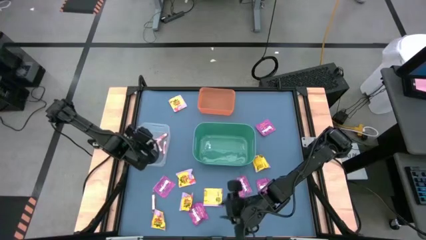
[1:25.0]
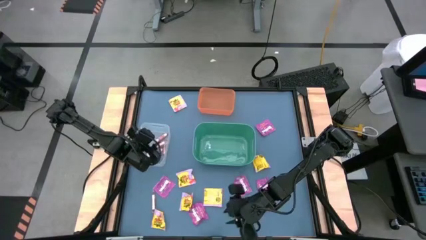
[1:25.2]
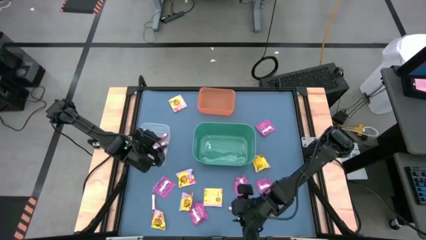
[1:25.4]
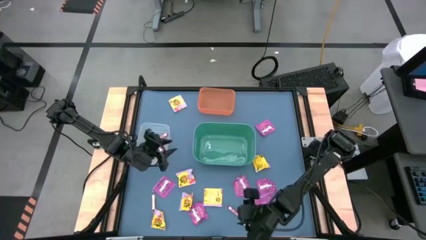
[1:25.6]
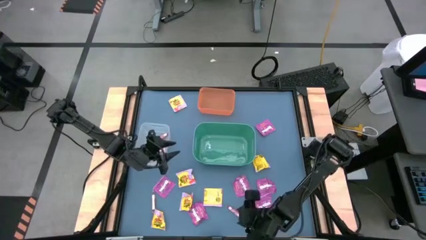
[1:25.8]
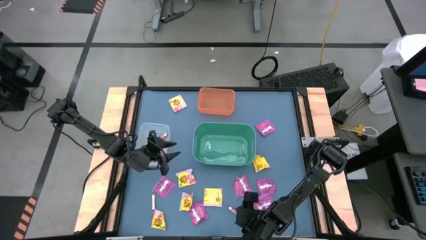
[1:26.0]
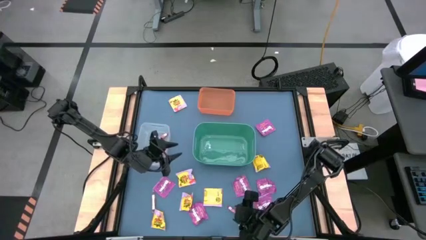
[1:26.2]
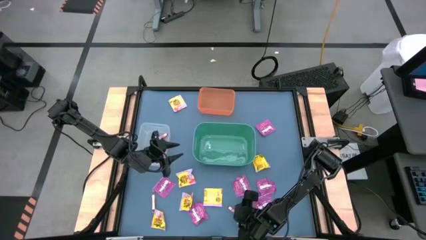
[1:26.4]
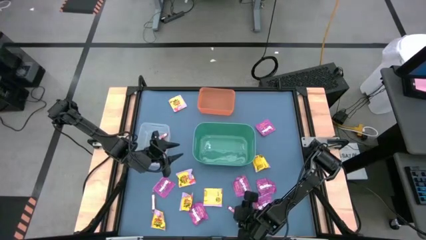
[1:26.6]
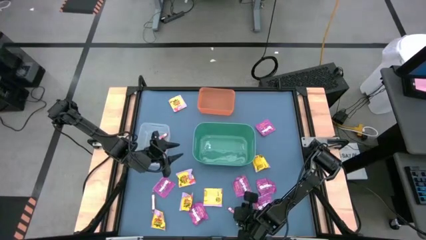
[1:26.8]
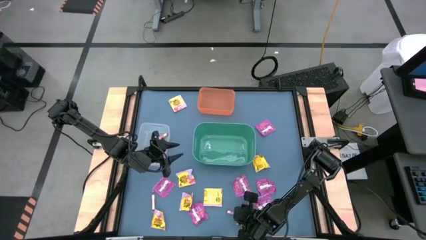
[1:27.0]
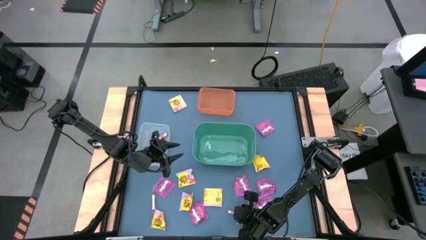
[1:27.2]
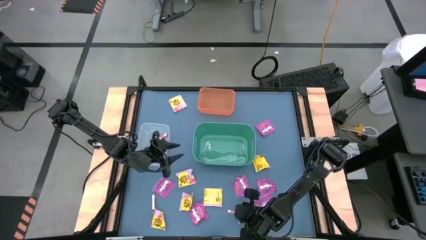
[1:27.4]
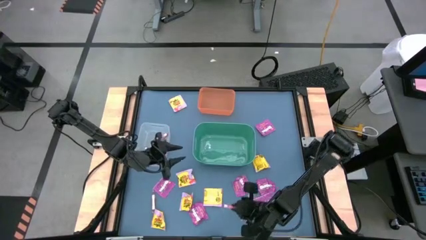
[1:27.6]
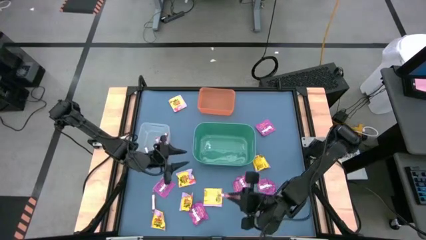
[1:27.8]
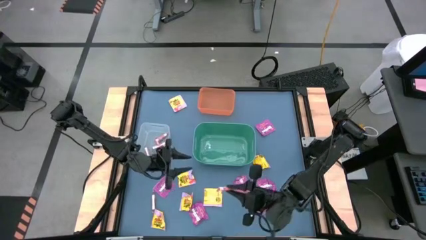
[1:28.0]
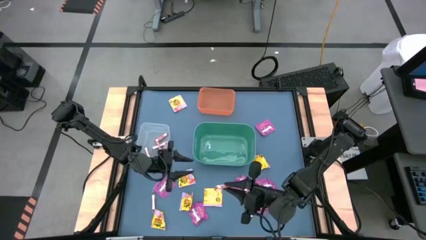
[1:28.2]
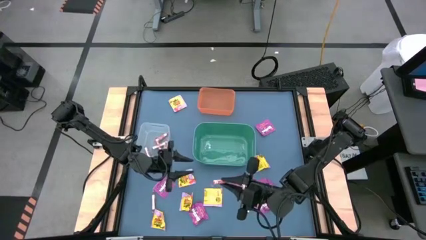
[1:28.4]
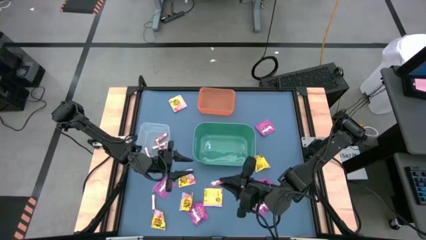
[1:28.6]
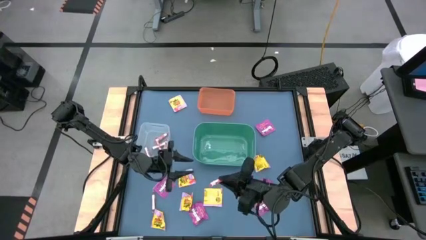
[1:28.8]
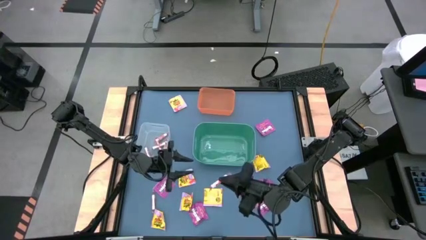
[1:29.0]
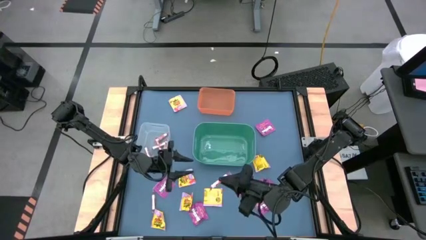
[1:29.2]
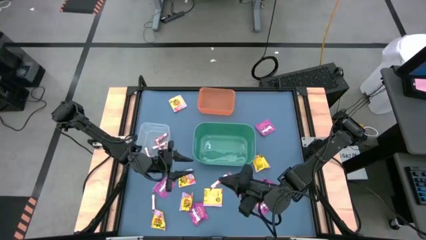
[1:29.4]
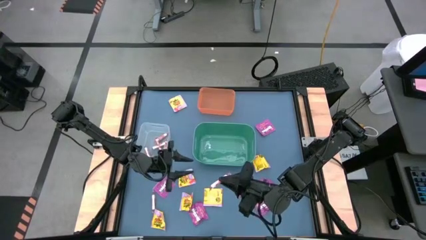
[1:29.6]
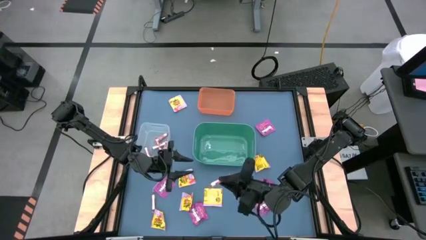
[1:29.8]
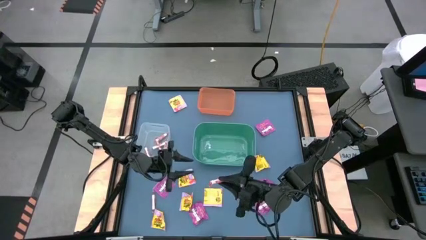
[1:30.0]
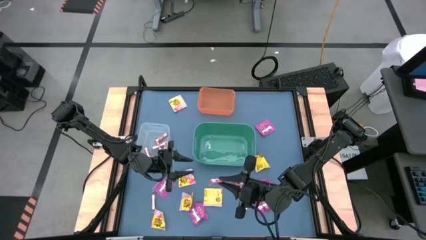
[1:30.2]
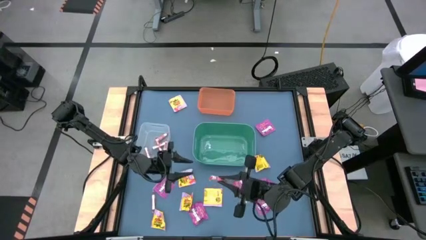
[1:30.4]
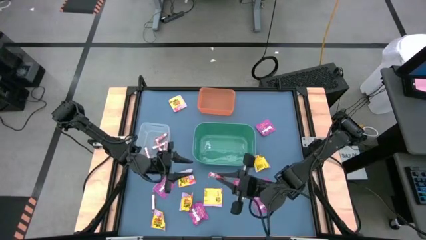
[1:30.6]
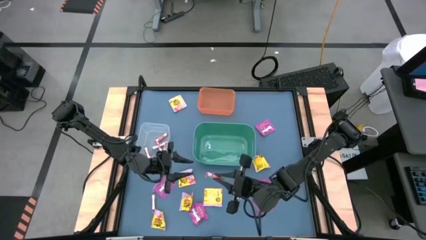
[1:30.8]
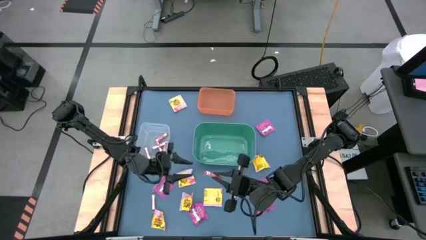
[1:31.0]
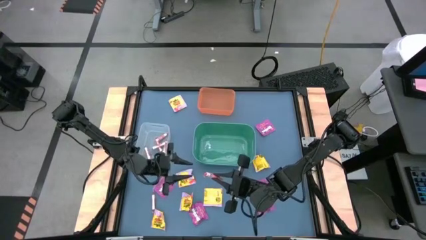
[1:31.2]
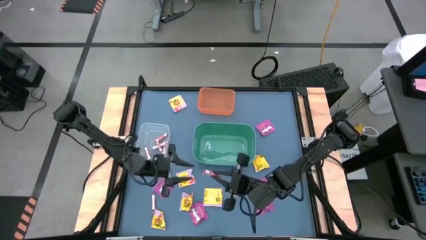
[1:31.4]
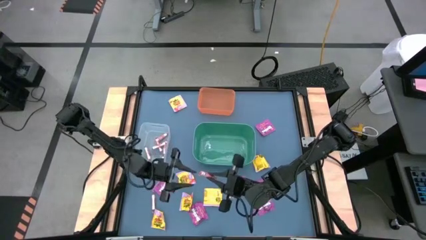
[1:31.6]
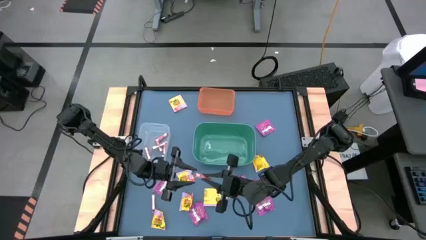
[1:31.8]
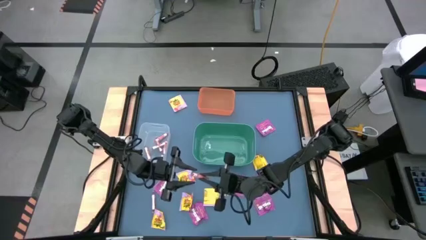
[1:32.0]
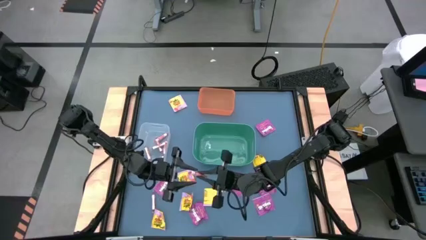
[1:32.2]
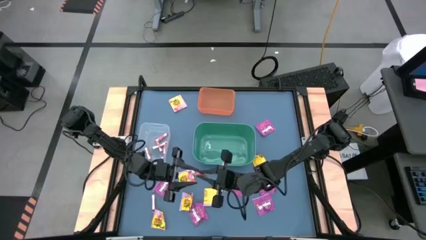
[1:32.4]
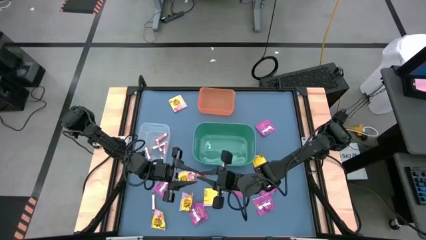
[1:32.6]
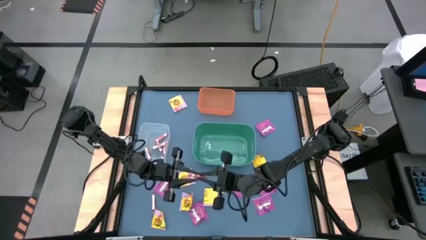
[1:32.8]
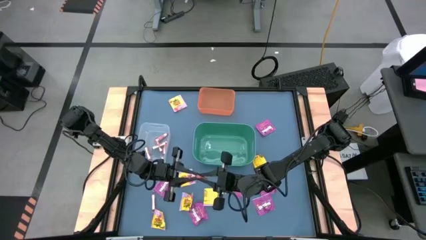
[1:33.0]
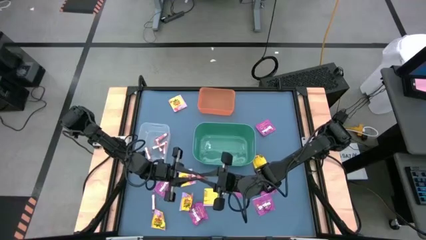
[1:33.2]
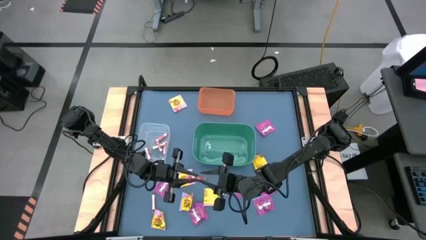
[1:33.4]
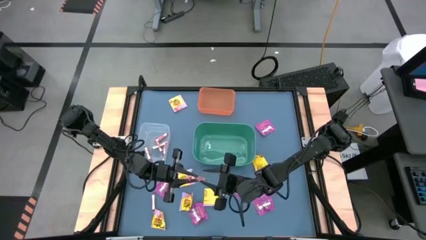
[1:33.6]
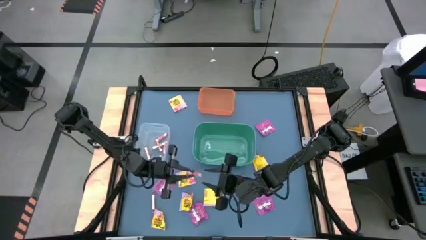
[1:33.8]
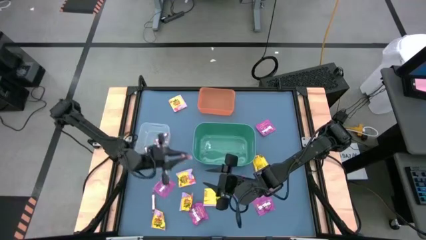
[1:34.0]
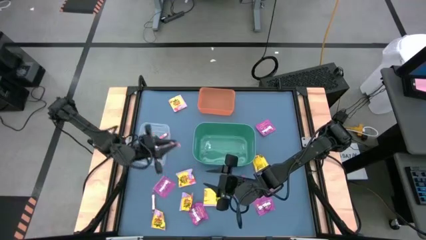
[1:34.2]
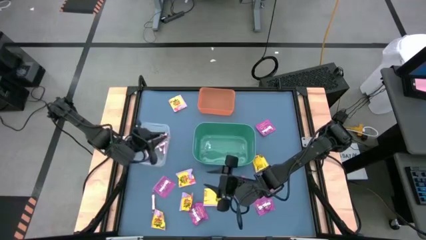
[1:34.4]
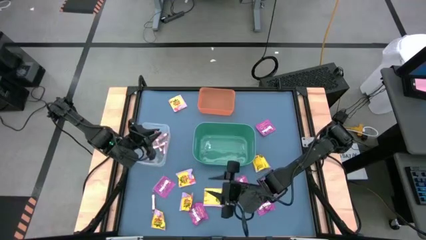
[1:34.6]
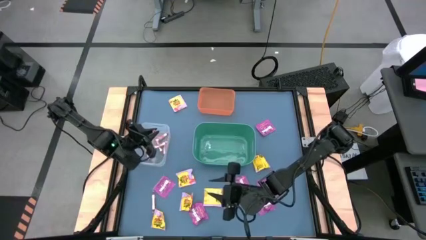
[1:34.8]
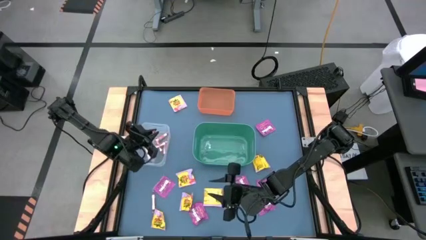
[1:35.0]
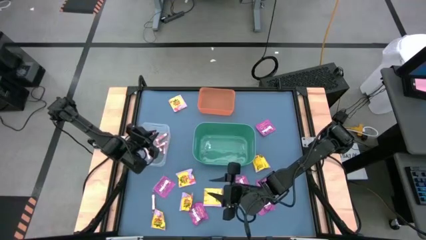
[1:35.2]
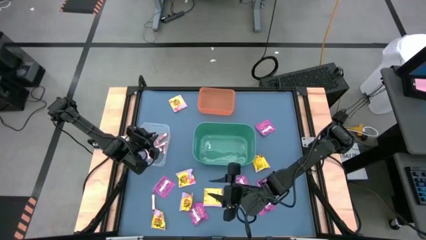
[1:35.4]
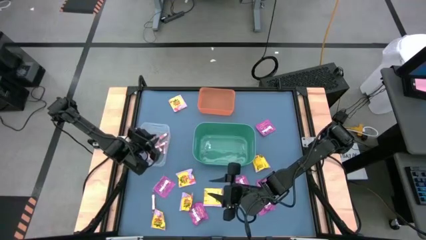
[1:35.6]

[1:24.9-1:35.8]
Task: Sort candy
Put the orange candy into the transparent bin

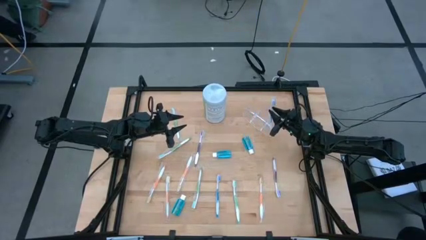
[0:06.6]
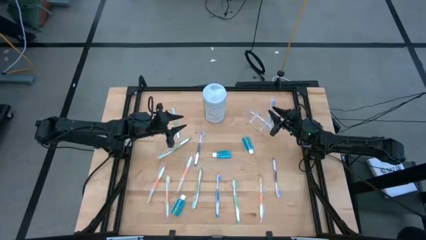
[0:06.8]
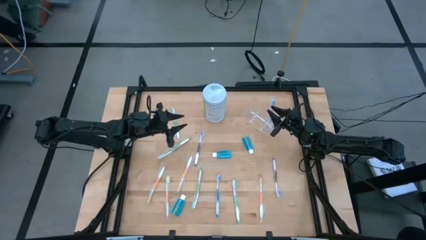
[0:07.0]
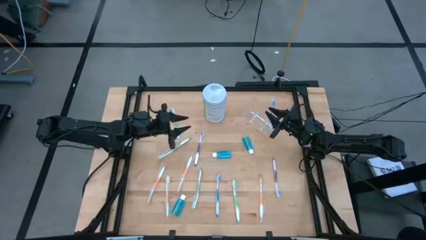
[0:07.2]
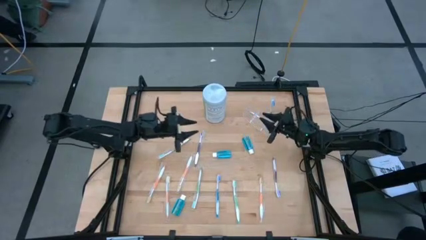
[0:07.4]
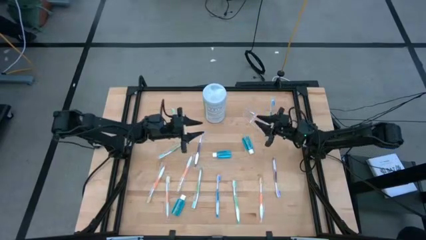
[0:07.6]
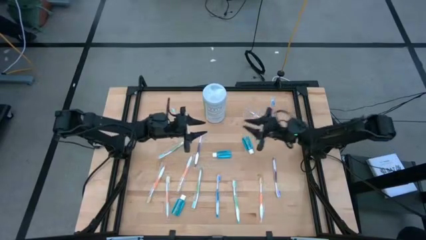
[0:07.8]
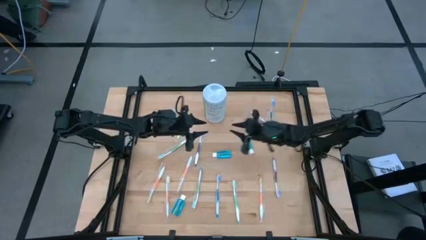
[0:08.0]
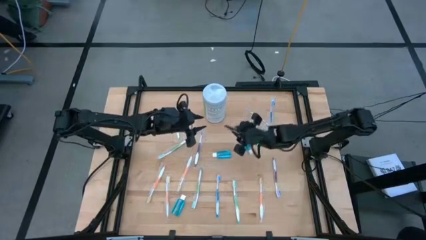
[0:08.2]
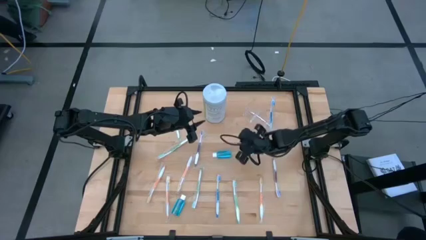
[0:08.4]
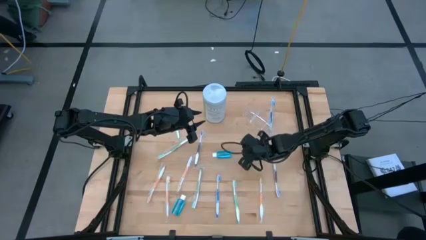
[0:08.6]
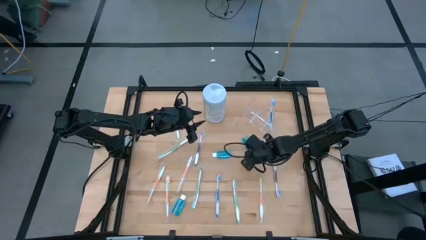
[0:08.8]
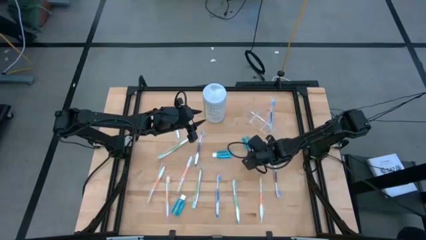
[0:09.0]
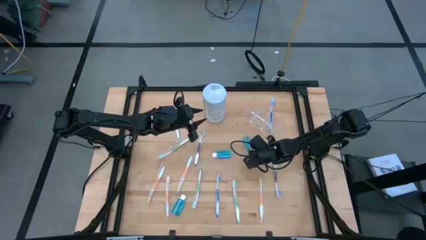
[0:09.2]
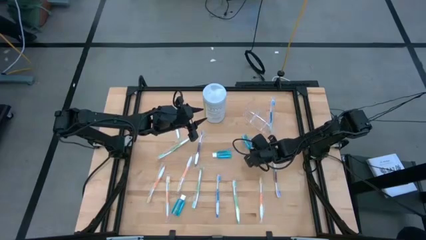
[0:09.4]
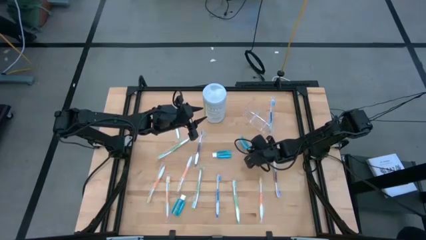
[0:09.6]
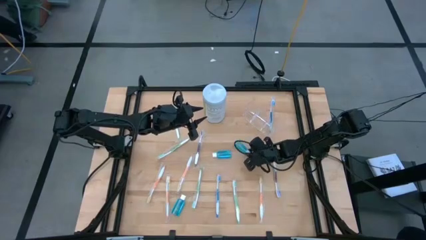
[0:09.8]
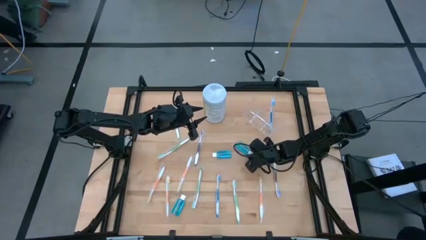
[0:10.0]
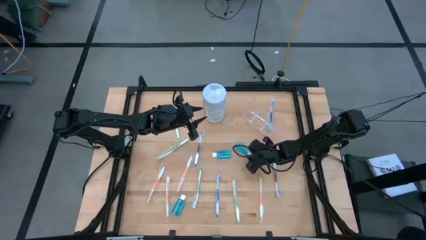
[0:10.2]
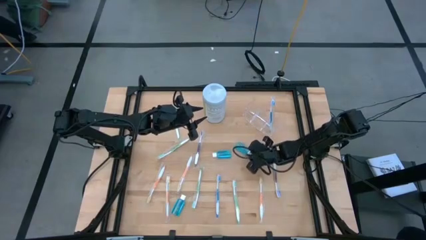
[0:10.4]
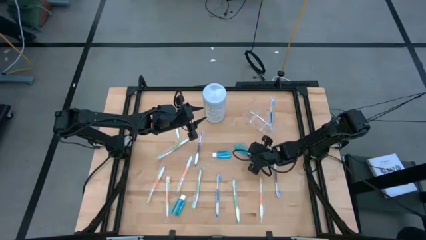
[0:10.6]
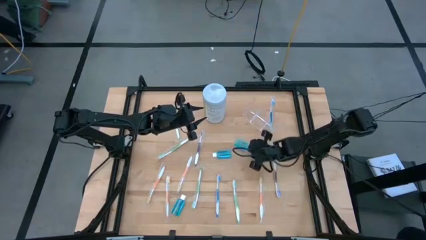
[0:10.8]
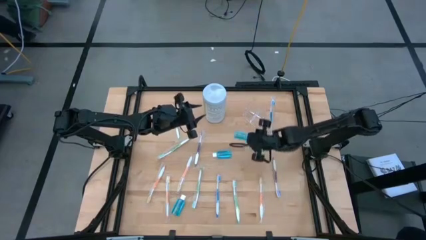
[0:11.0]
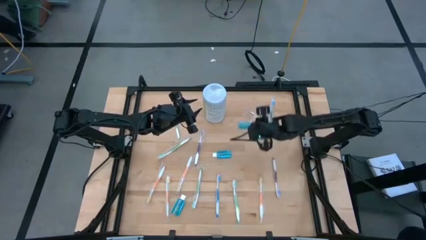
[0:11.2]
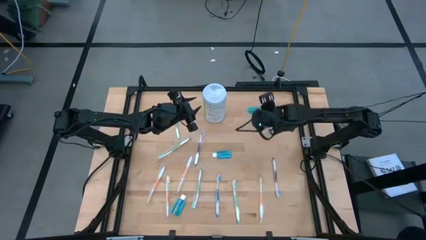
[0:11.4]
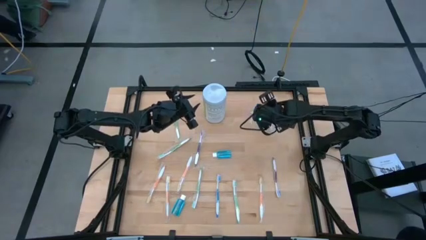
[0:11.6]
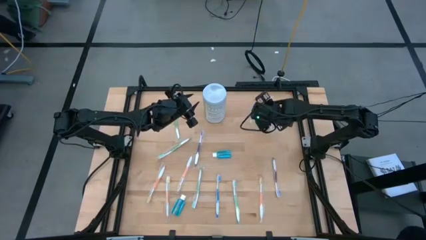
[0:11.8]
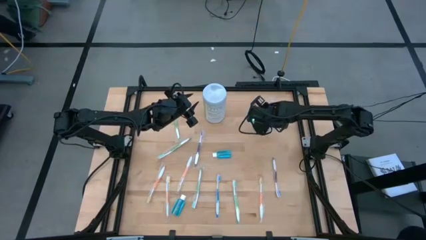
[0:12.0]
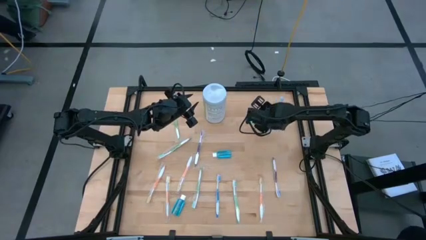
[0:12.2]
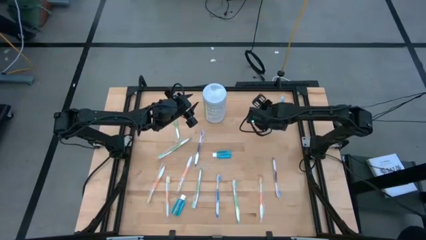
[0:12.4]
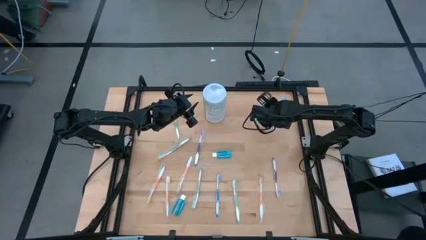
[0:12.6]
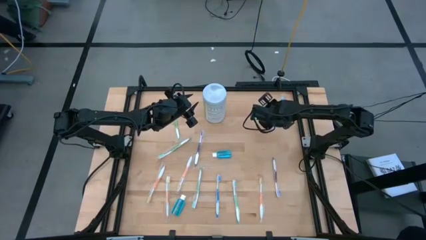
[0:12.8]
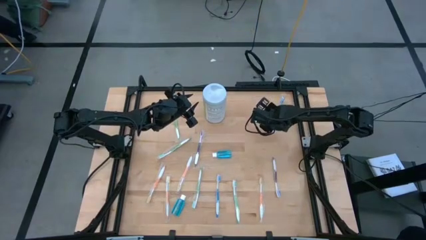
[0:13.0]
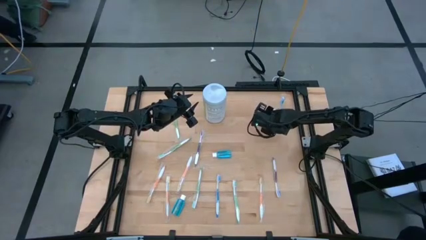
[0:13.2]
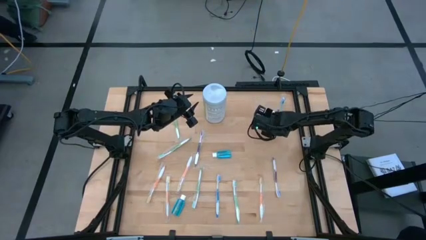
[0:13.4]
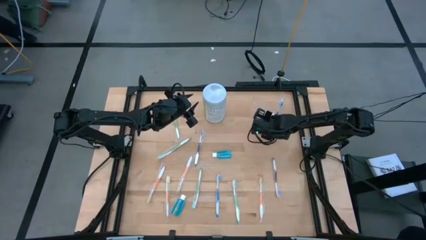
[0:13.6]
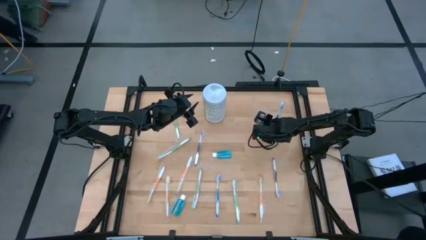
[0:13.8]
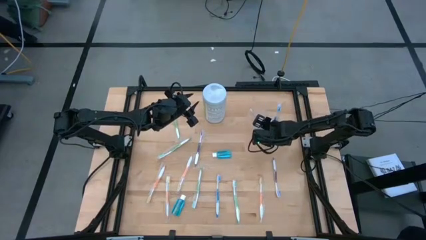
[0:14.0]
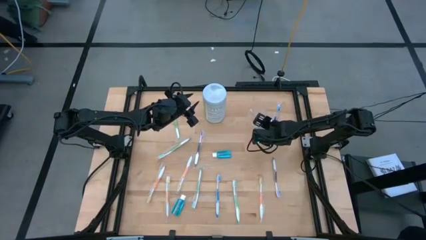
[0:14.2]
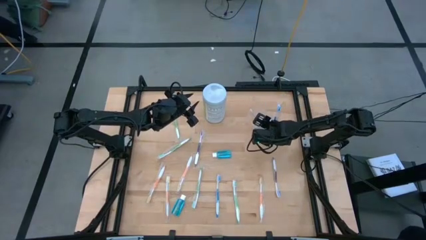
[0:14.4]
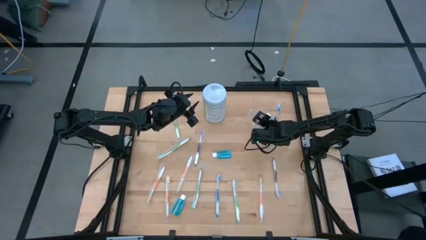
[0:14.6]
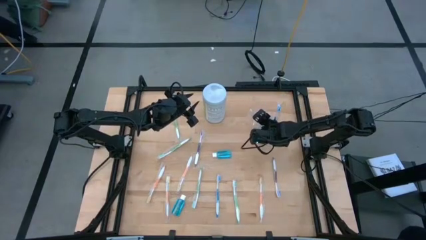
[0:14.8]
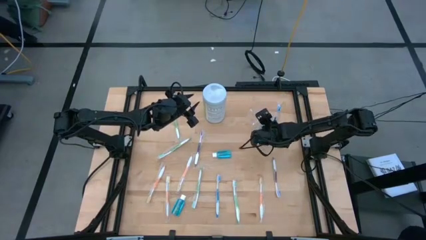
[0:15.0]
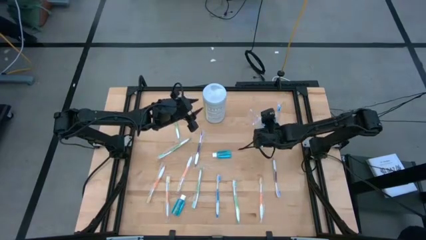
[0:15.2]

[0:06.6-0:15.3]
Task: Pick & Place toothbrushing station
Put the blue mouthwash into the transparent organizer
